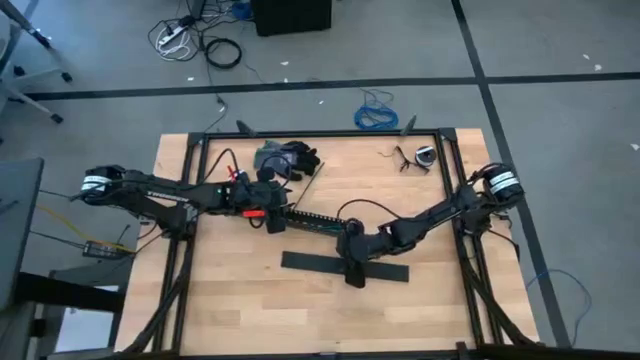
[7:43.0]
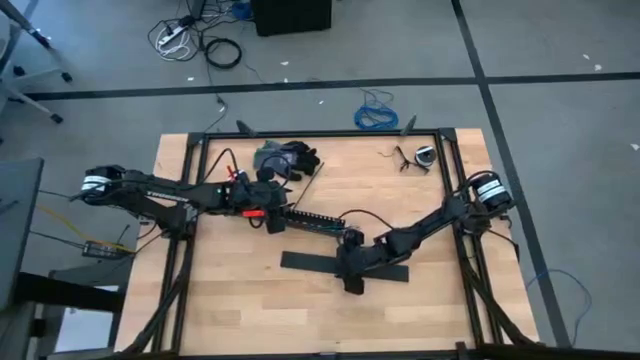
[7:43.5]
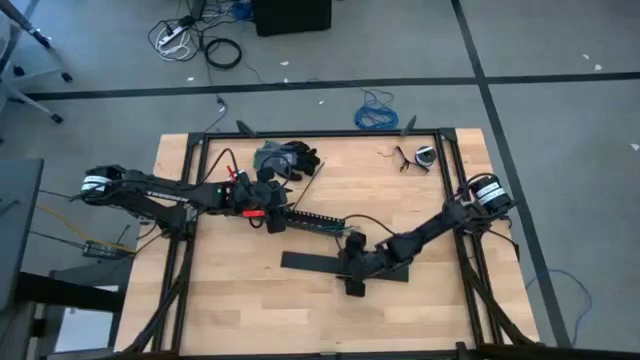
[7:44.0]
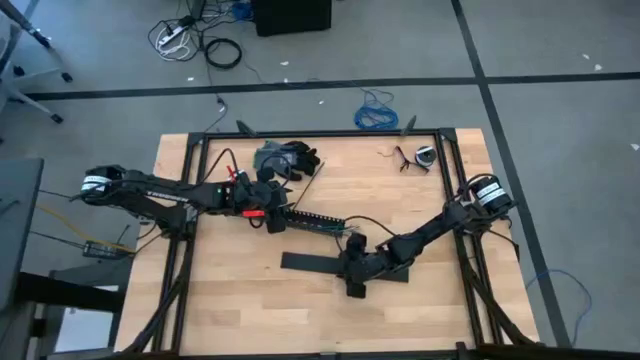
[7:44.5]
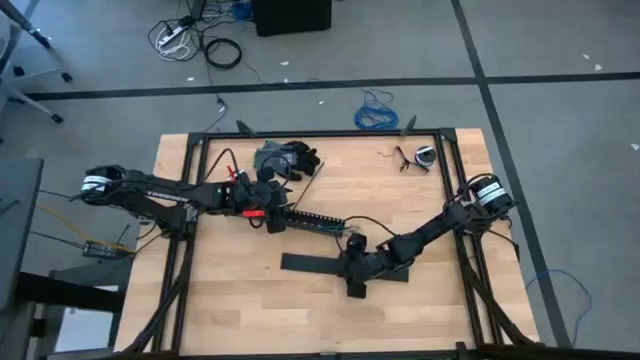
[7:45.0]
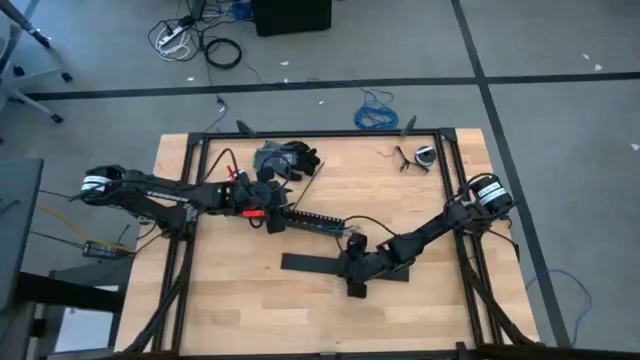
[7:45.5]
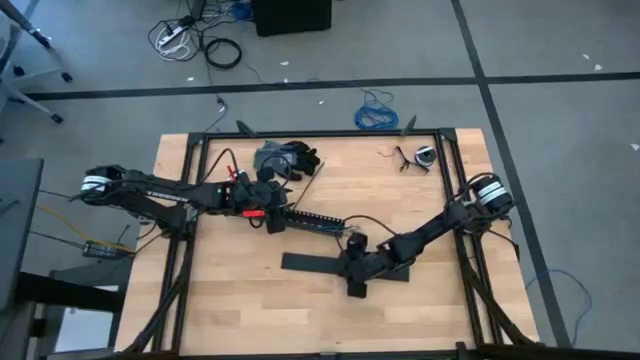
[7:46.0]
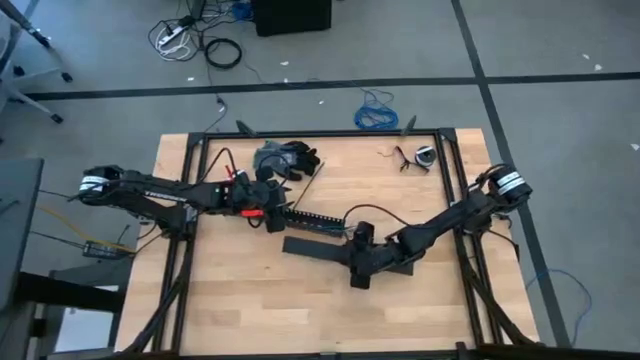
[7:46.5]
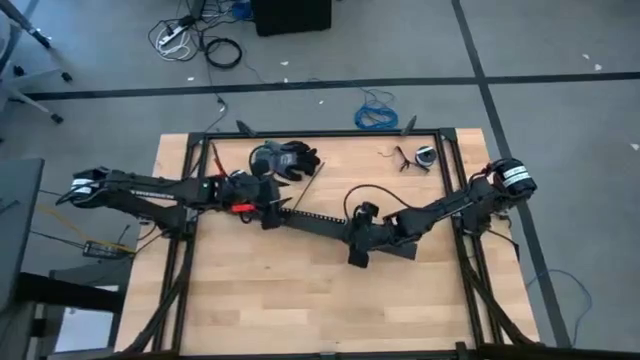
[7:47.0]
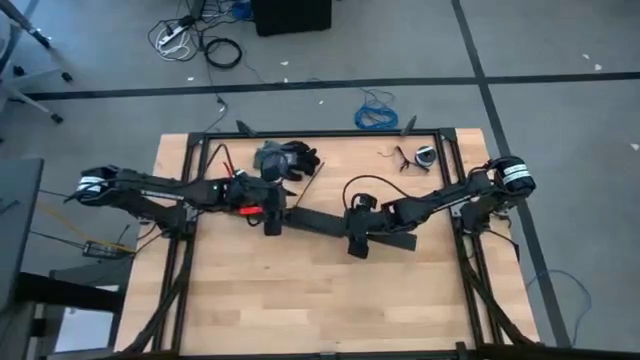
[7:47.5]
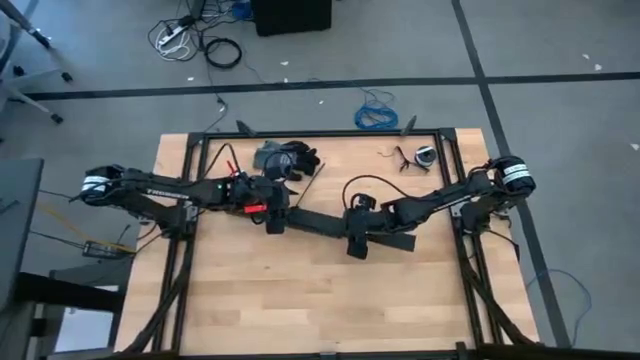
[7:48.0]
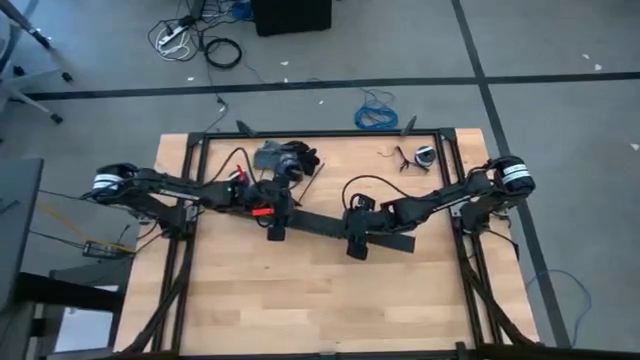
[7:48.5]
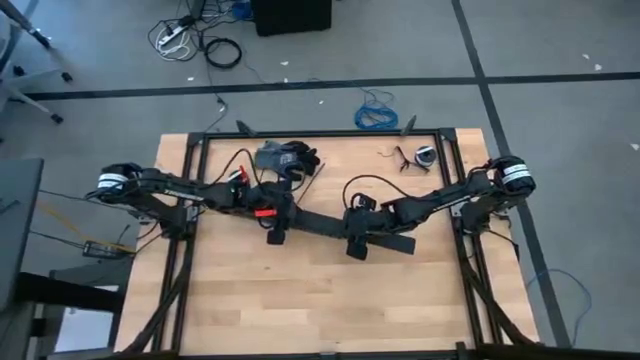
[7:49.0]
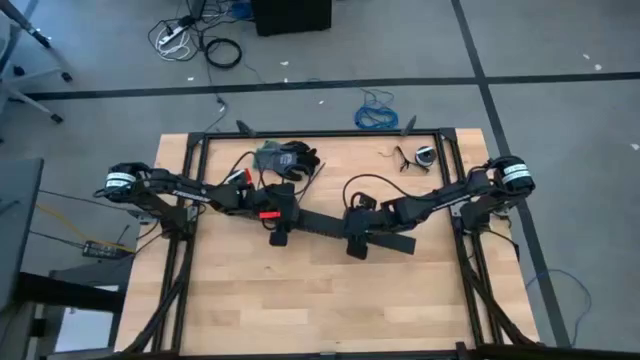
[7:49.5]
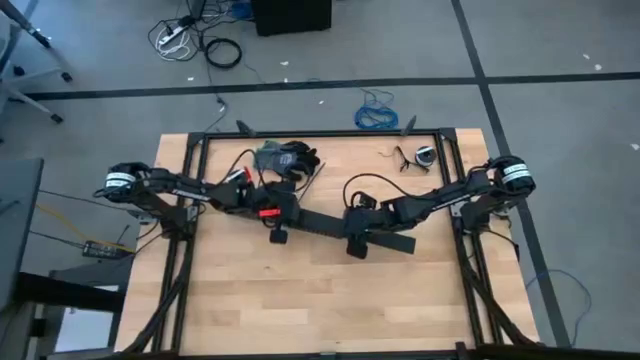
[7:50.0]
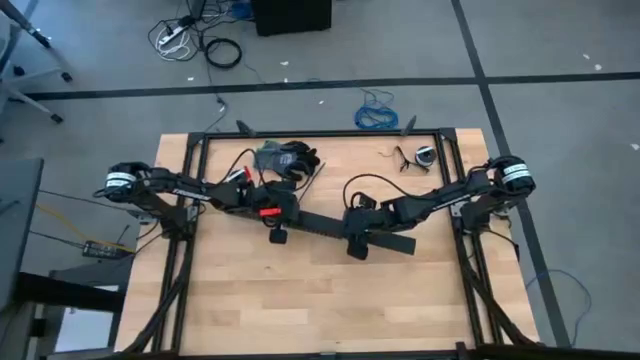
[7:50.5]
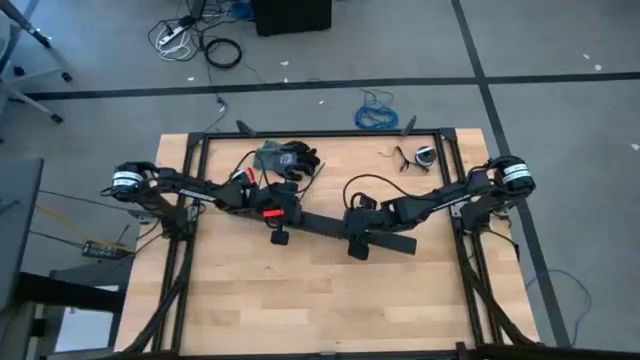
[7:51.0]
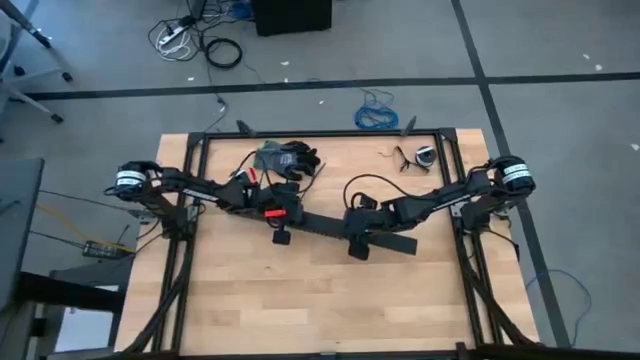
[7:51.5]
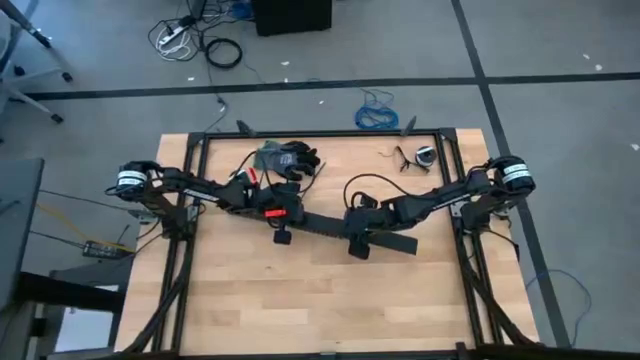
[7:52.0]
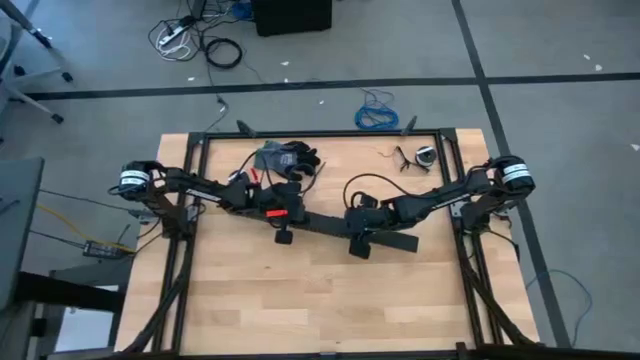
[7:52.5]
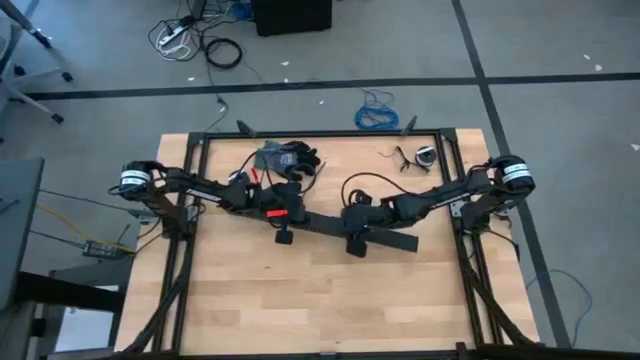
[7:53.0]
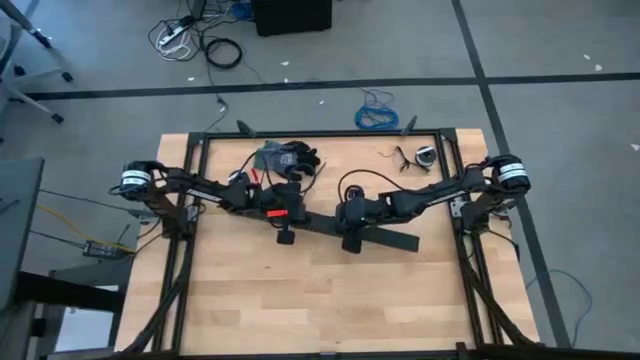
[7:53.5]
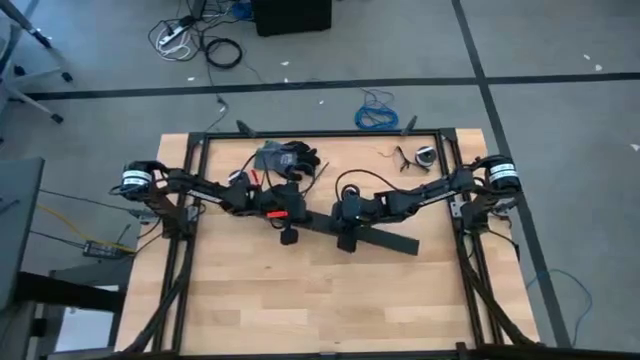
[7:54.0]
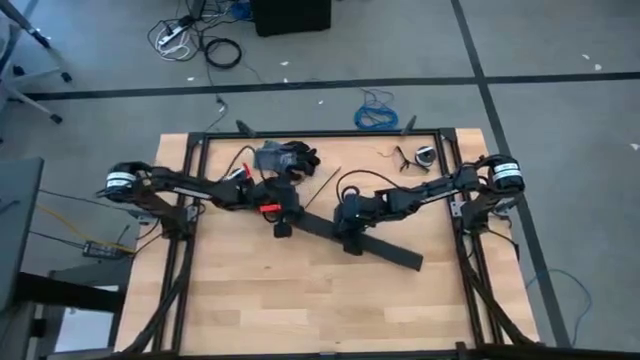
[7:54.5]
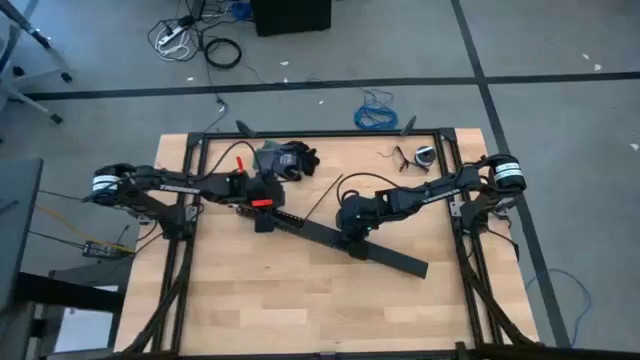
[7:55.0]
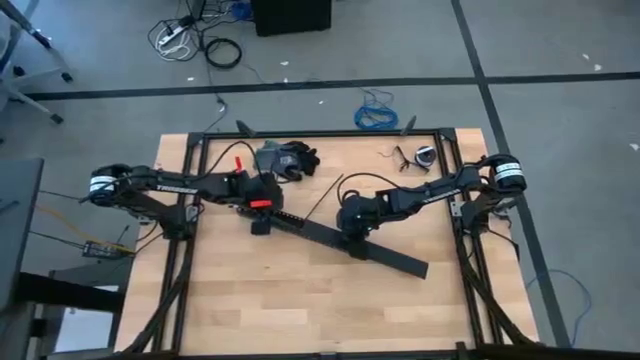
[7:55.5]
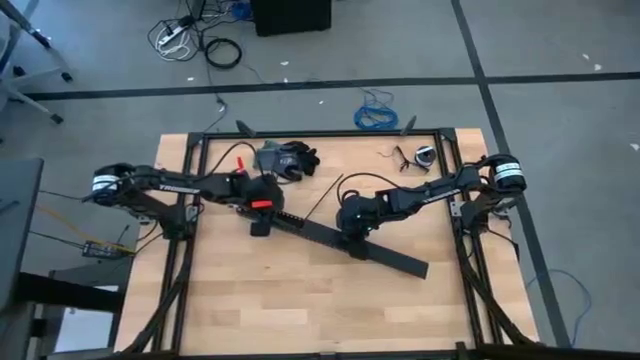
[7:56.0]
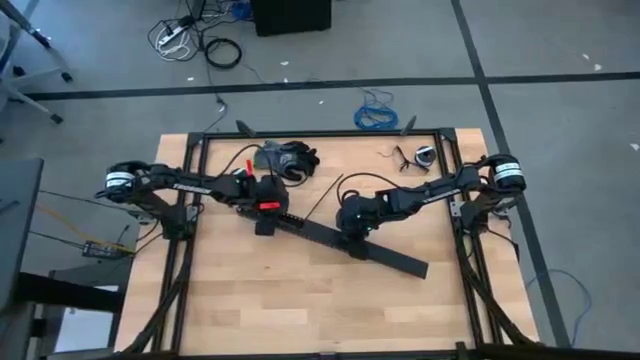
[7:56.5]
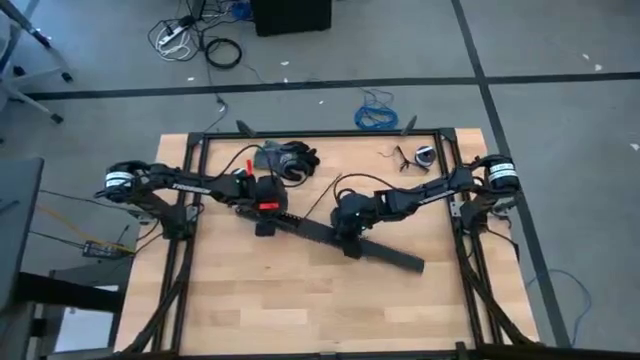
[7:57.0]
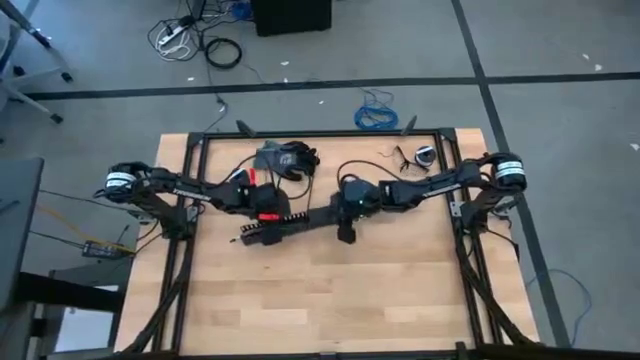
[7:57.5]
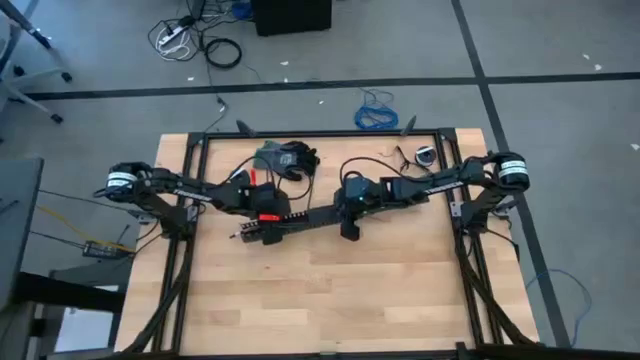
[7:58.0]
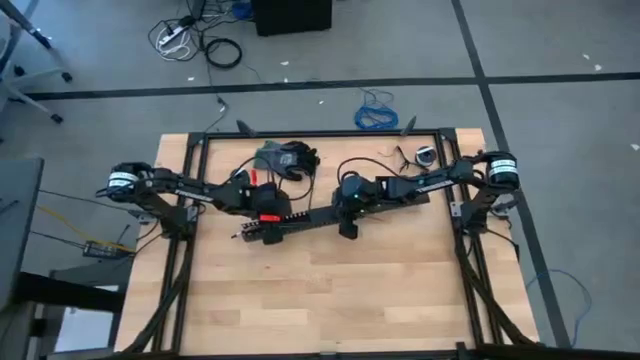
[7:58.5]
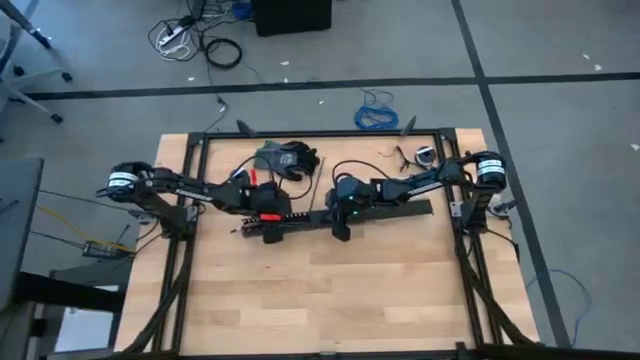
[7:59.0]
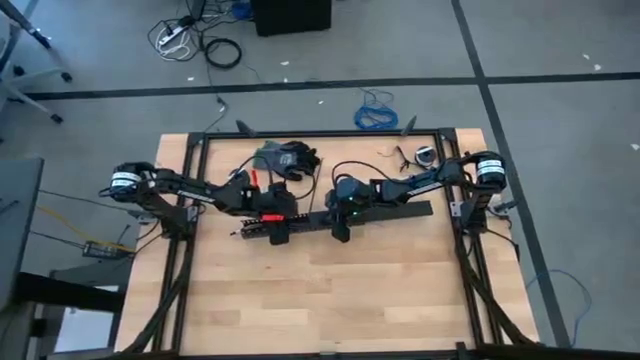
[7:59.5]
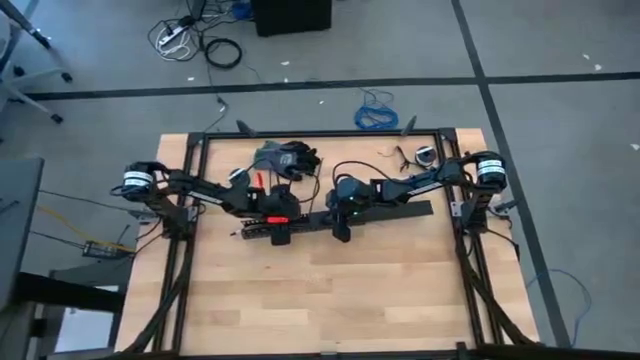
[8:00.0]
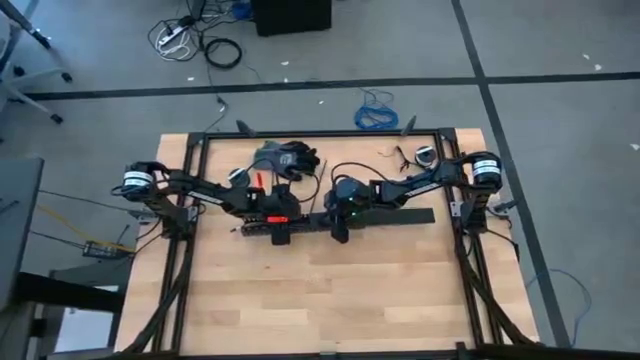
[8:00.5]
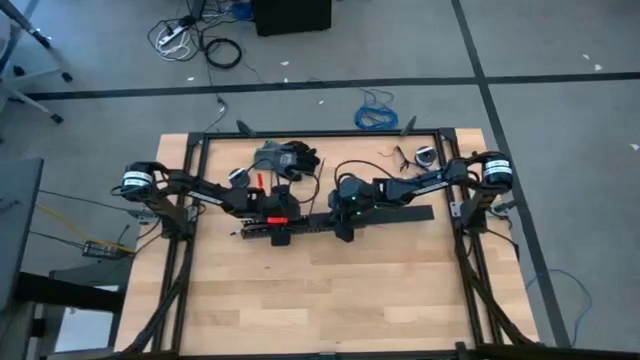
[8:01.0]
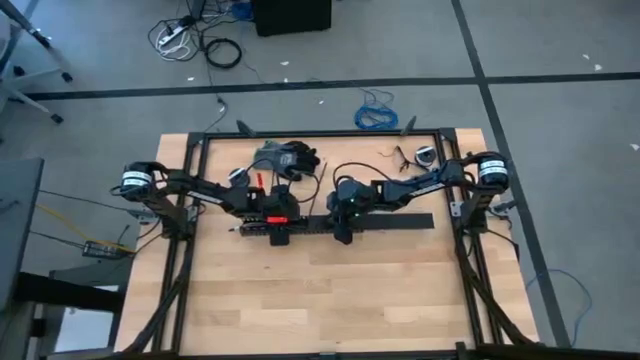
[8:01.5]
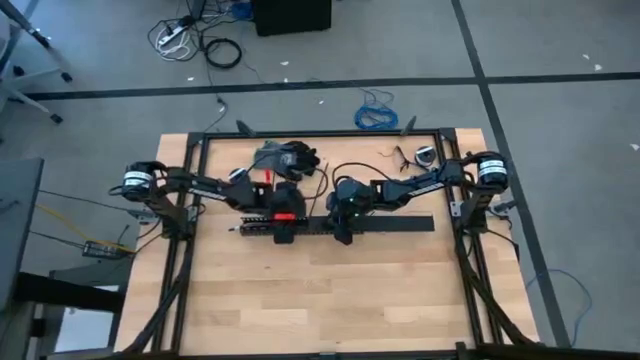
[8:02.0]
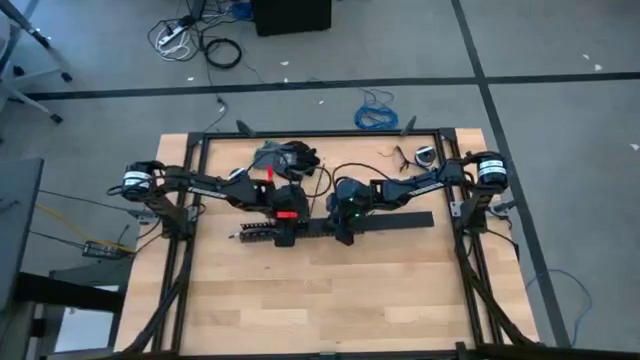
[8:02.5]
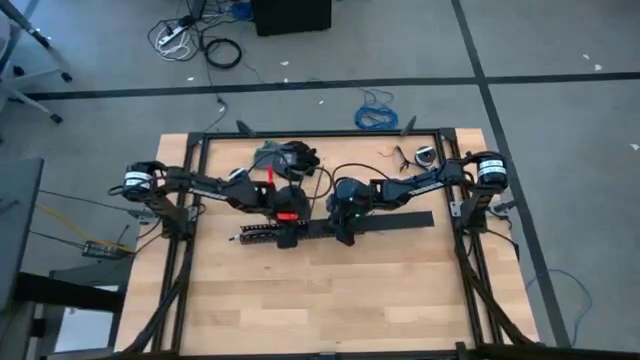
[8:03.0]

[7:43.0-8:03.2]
Task: Ziptie cables
Close the black cable duct cover

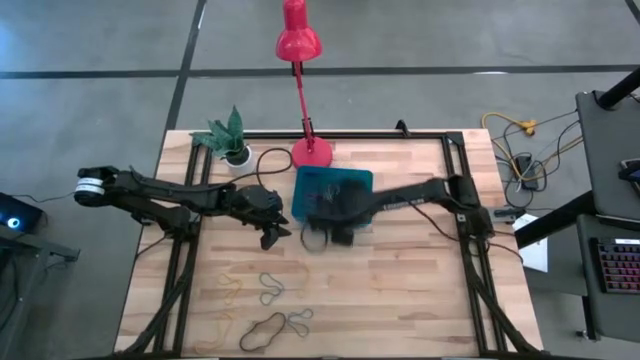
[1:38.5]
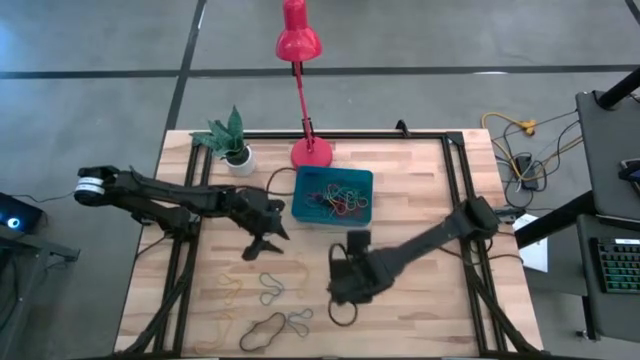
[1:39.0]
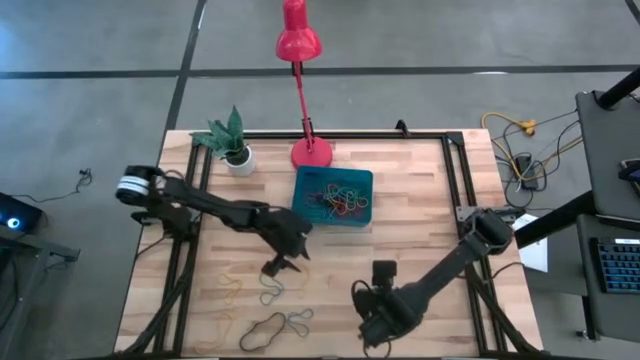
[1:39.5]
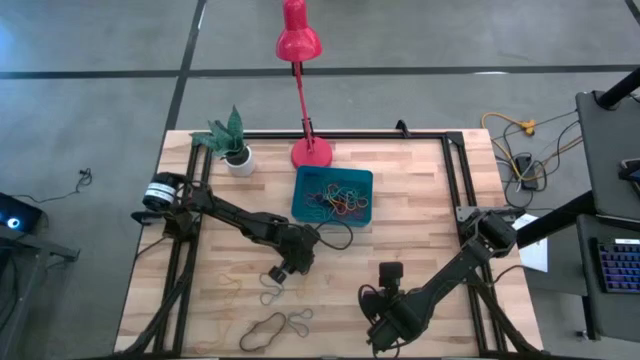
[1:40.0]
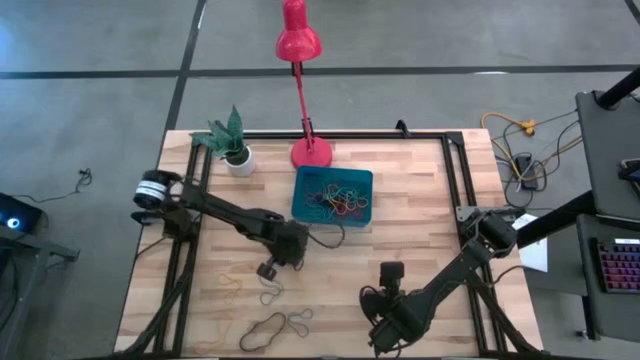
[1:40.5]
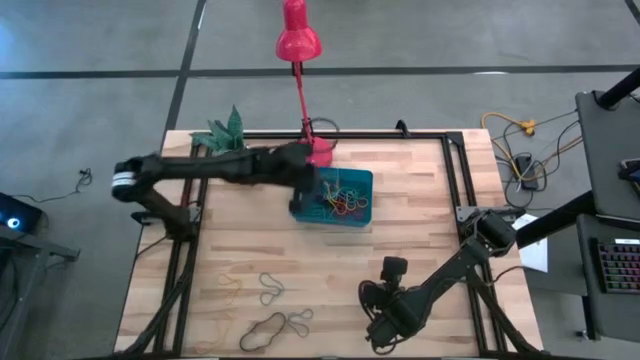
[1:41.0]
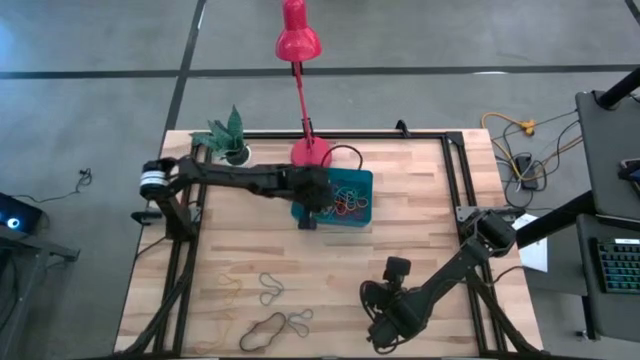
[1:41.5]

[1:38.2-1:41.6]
Task: Pick and place rubber bands into bin
Put the yellow rubber band into the blue bin
